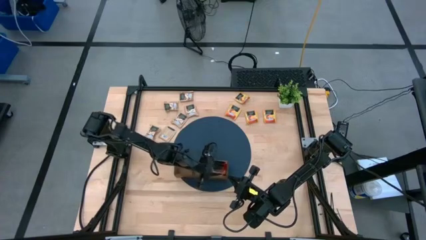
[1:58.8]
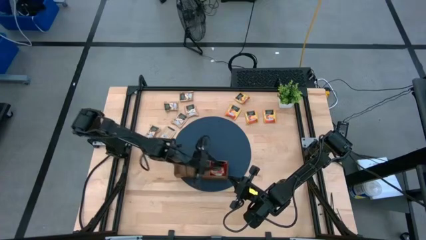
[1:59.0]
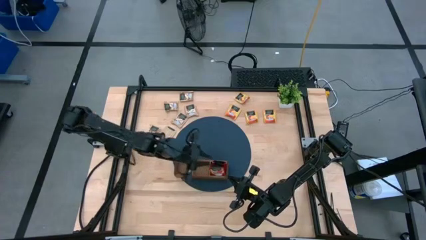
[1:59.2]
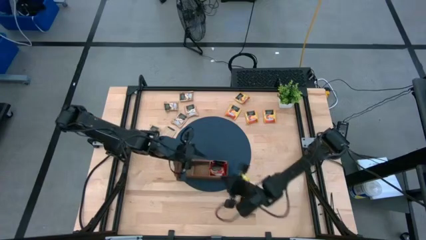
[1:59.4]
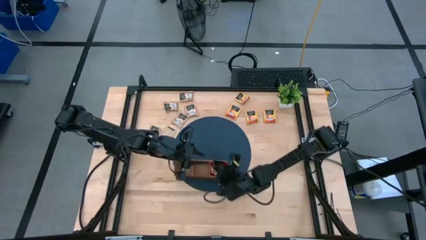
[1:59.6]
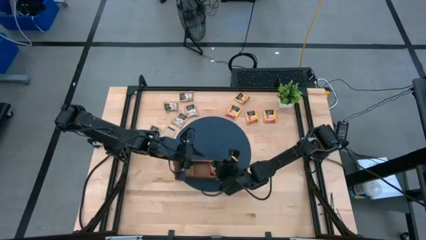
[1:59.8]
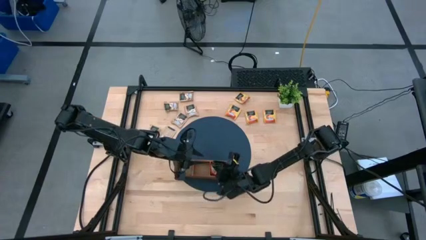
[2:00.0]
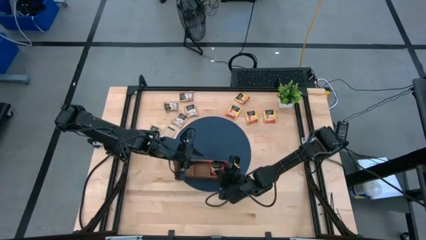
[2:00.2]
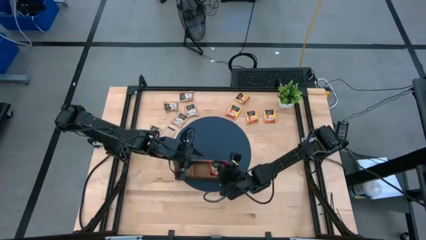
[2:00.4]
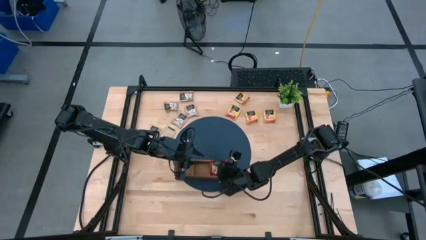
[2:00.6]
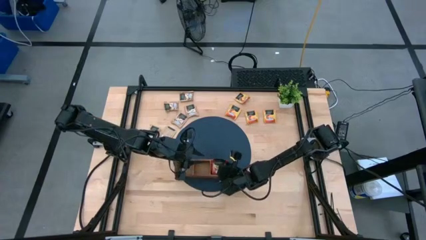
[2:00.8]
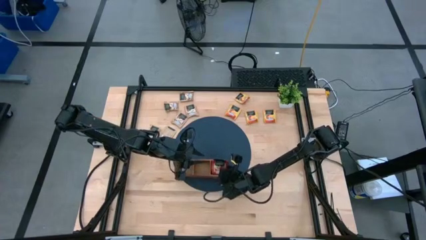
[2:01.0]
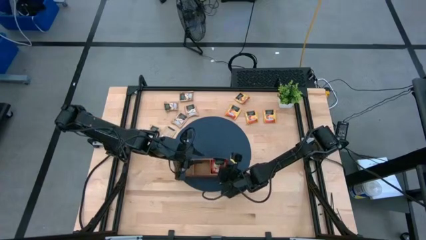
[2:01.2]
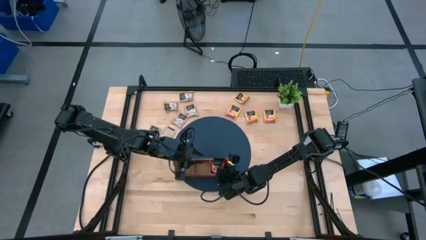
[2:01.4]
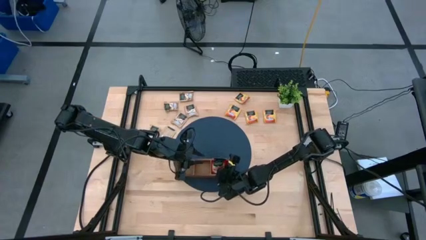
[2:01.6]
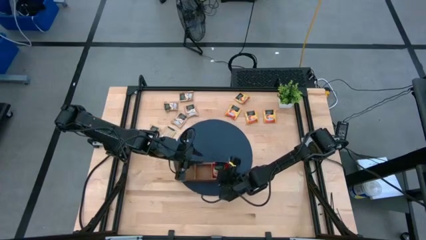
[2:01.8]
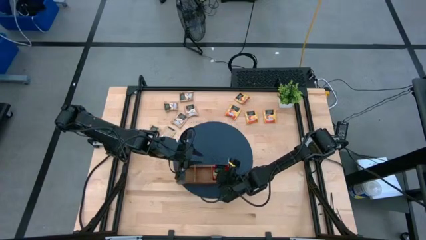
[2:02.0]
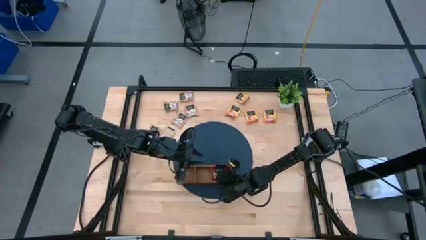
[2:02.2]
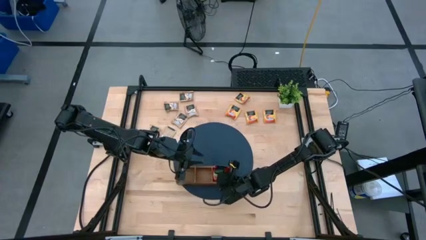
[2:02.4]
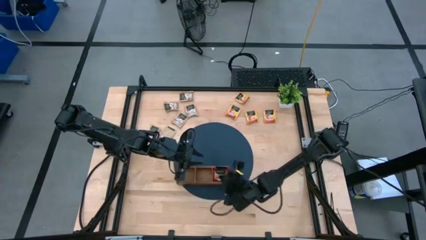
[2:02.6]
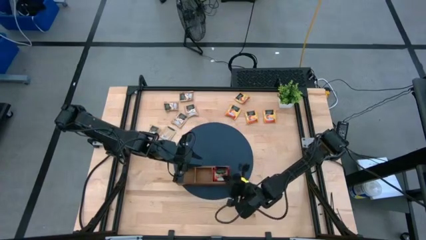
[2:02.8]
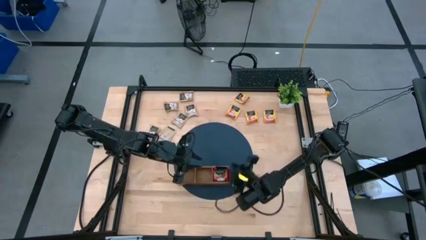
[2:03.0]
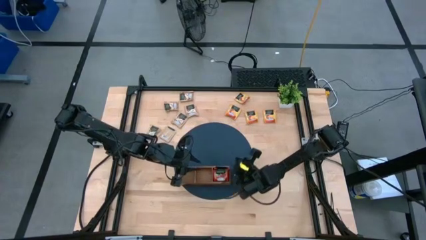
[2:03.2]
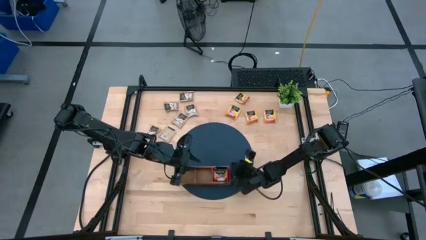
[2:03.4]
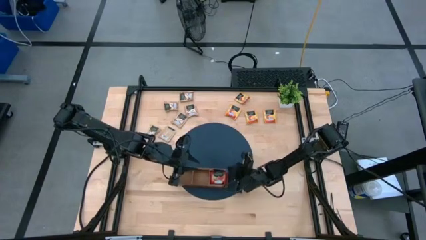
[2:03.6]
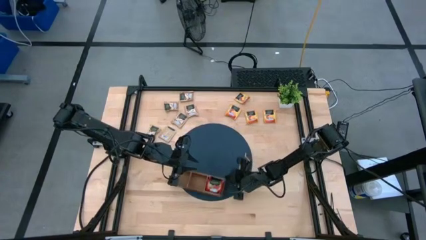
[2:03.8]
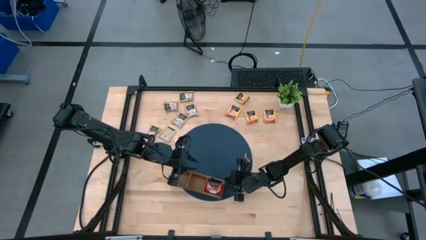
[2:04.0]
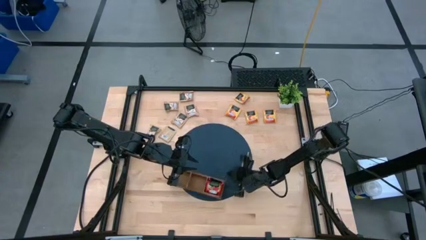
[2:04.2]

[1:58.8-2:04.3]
Task: Pick & Place Tea
Adjust the wooden organizer

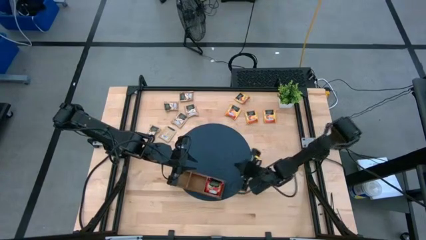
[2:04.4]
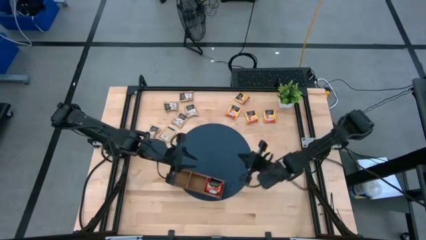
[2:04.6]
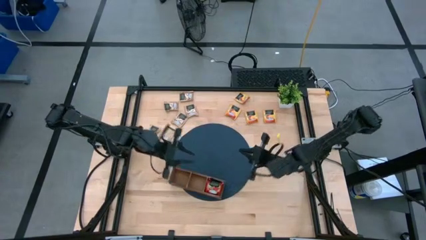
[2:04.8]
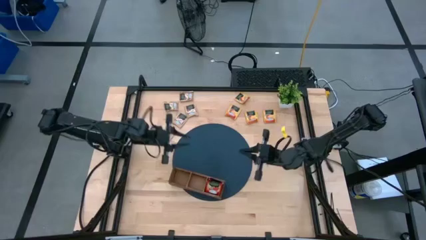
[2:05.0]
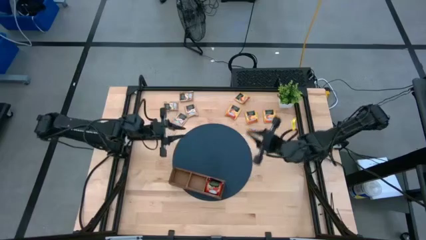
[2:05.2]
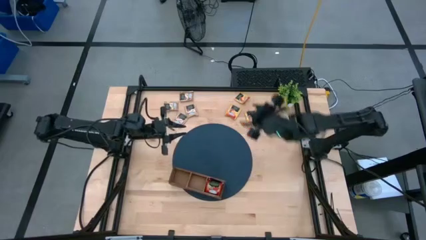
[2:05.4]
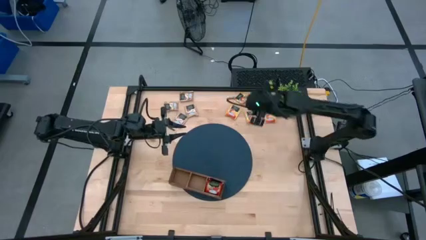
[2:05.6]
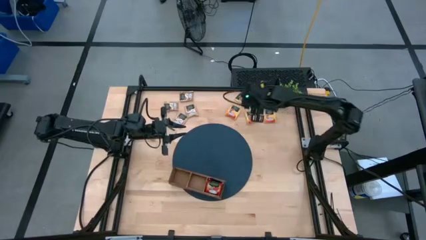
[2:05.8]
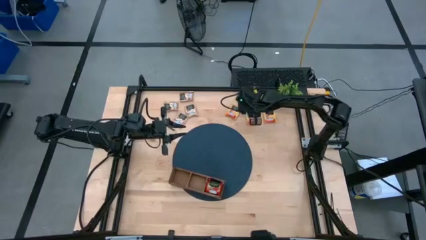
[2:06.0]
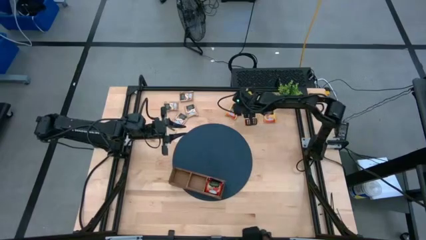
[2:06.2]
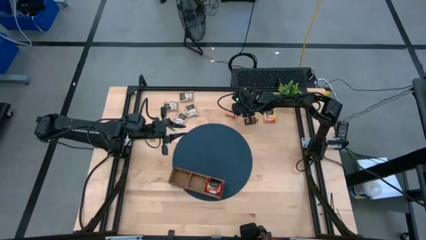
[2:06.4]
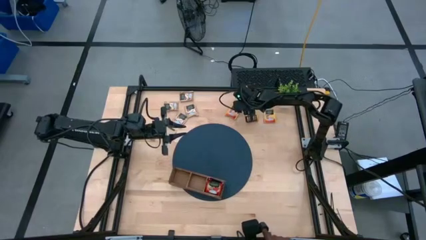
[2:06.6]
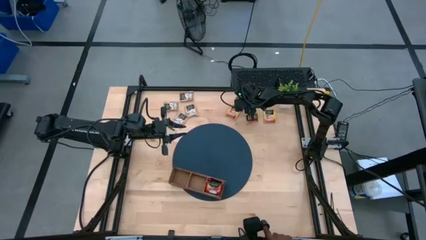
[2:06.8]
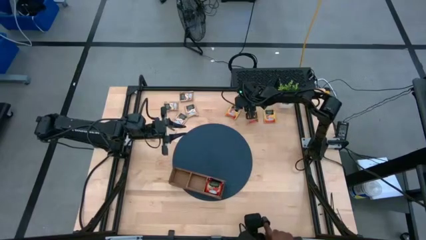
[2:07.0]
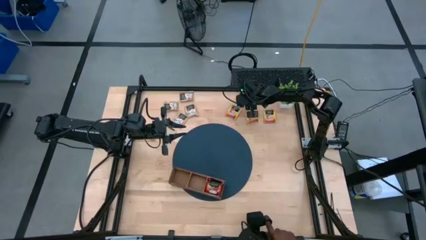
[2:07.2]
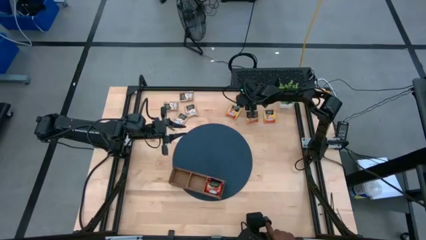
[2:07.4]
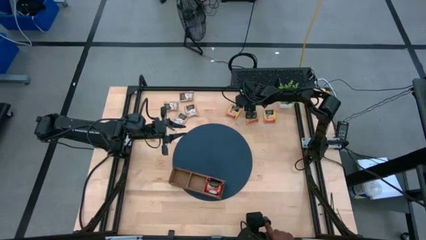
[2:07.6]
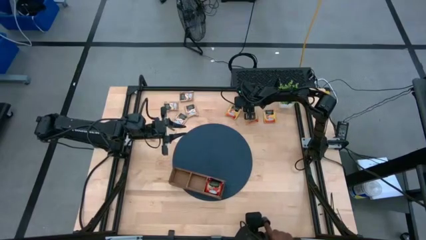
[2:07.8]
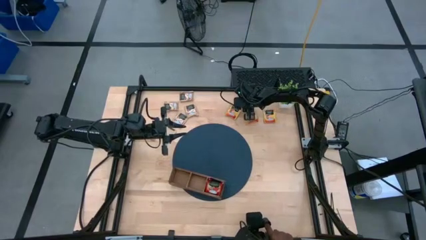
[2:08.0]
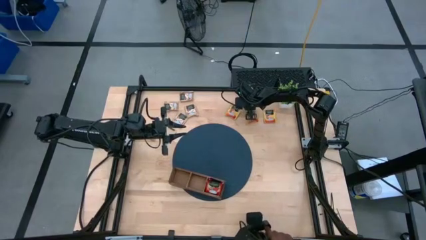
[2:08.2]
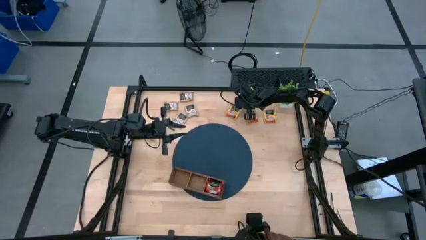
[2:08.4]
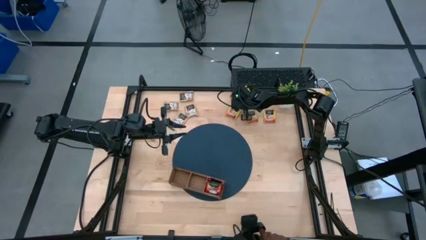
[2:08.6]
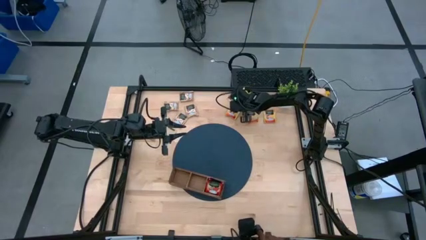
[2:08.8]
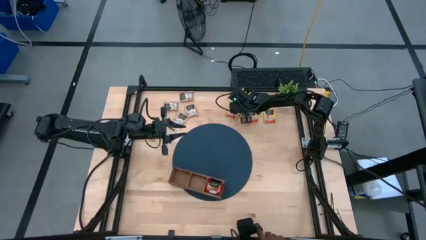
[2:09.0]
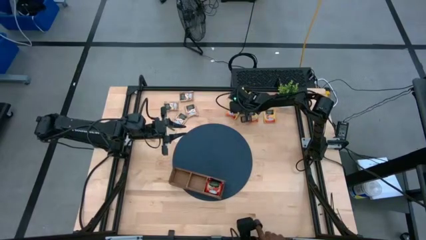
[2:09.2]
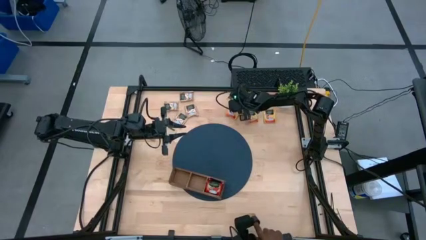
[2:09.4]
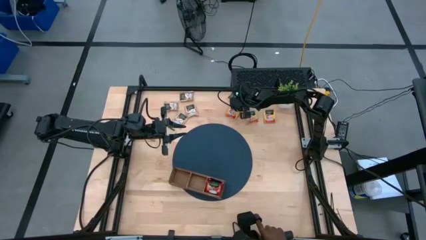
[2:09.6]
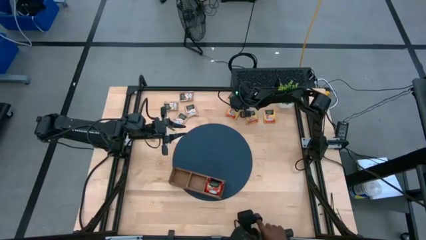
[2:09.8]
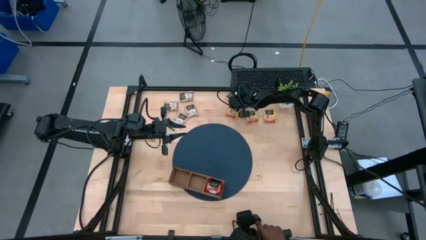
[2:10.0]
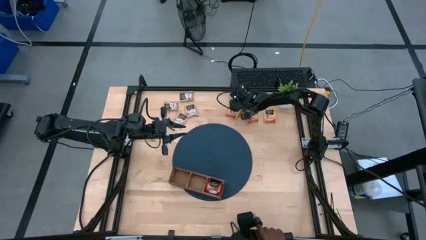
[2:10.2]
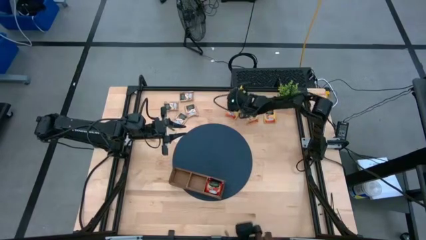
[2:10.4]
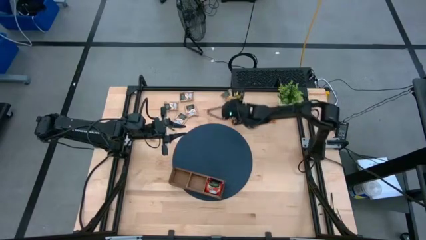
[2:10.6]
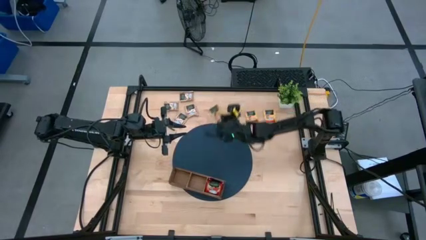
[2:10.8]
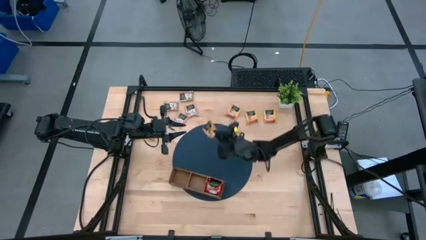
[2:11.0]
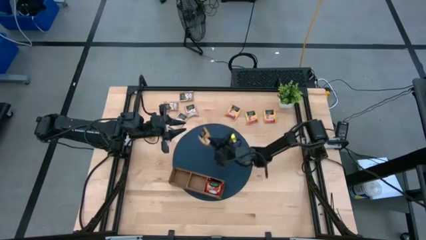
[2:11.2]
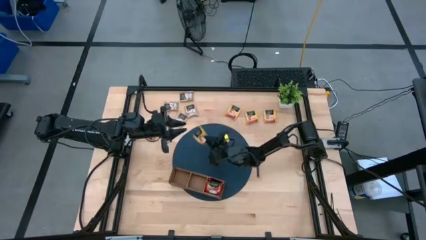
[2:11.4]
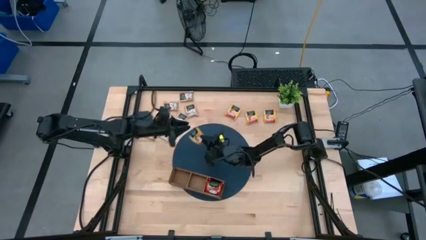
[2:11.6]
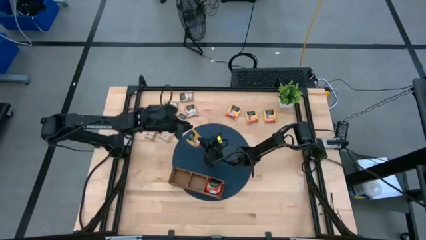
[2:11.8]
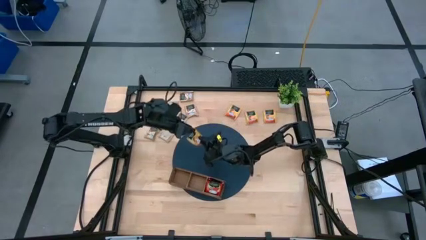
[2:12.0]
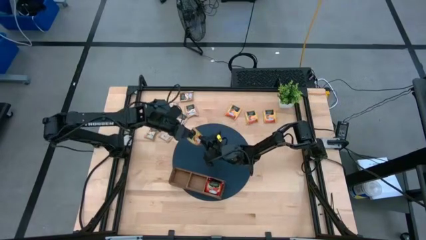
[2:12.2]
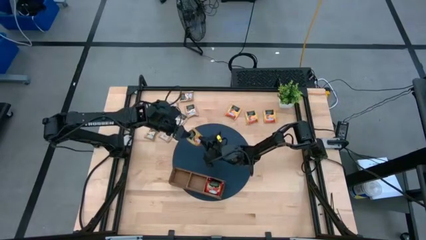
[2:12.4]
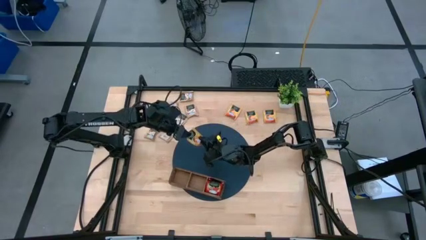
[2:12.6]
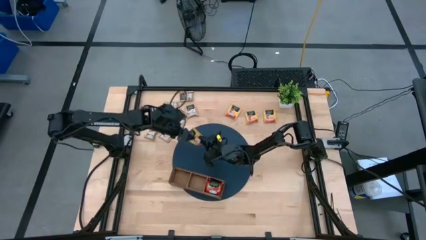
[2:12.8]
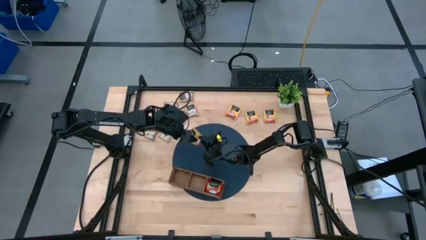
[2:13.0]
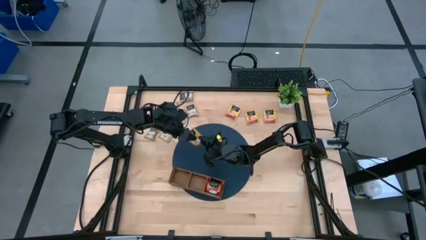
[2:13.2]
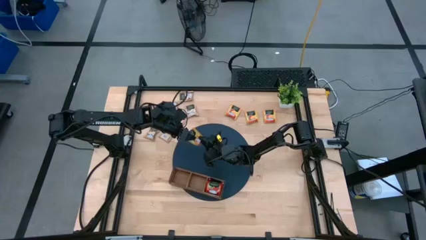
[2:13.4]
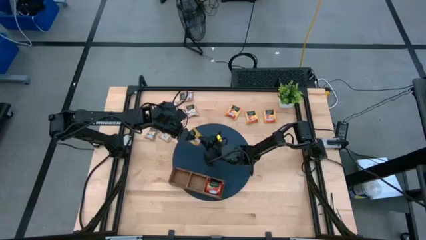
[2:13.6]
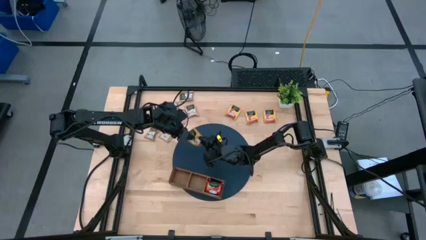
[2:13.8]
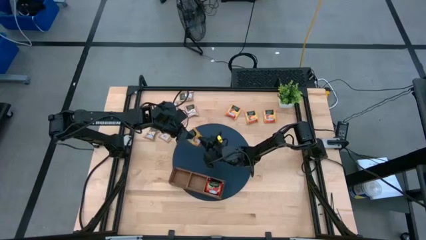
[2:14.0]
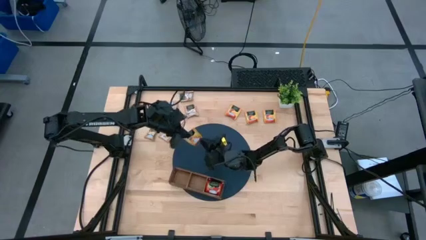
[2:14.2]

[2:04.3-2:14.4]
Put the yellow tea bag into the middle section of the wooden organizer
